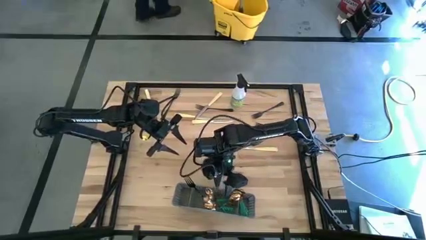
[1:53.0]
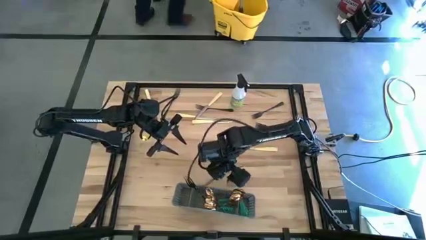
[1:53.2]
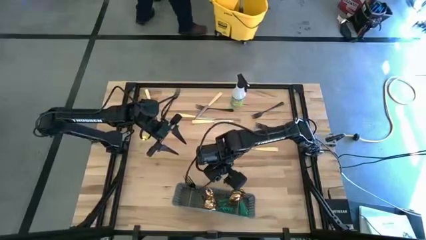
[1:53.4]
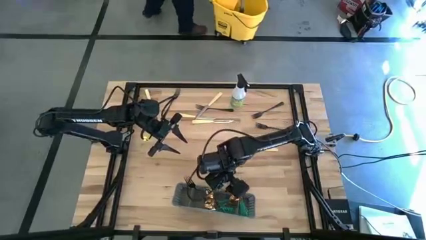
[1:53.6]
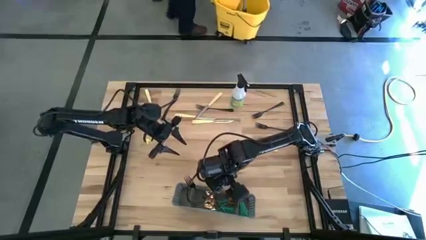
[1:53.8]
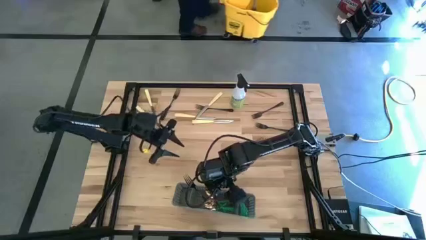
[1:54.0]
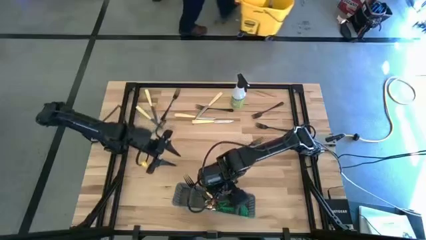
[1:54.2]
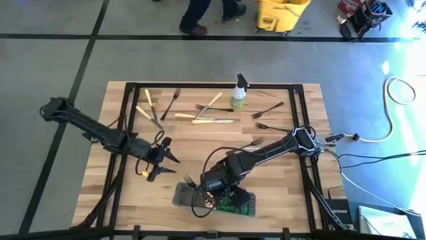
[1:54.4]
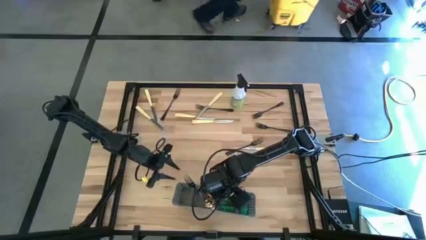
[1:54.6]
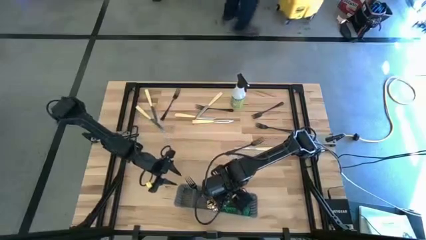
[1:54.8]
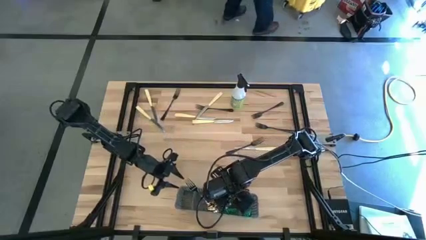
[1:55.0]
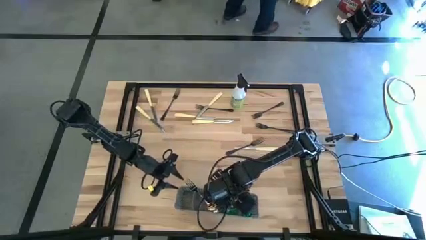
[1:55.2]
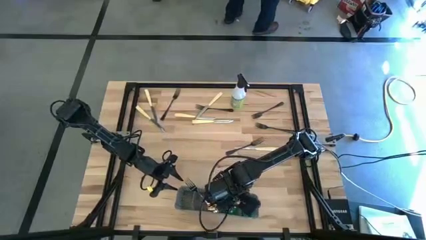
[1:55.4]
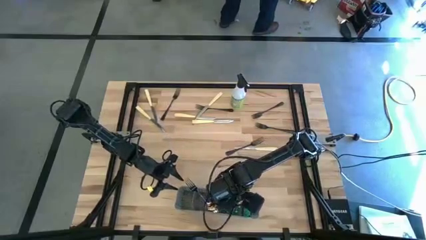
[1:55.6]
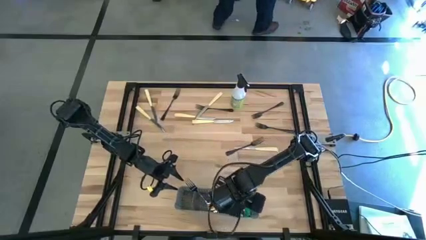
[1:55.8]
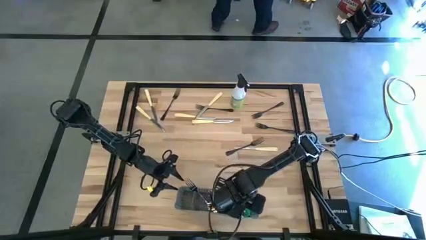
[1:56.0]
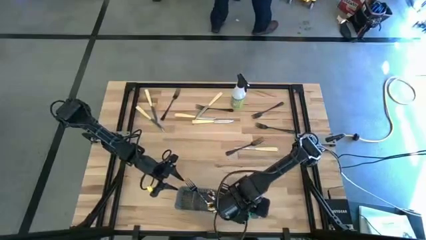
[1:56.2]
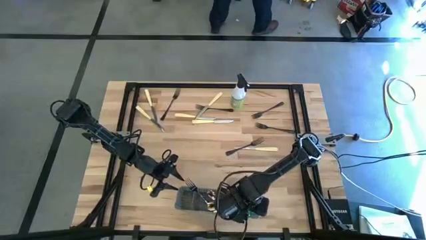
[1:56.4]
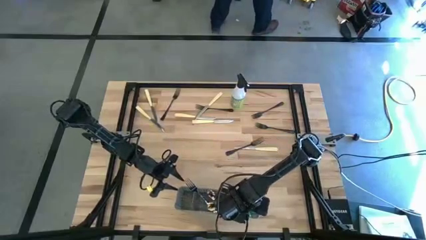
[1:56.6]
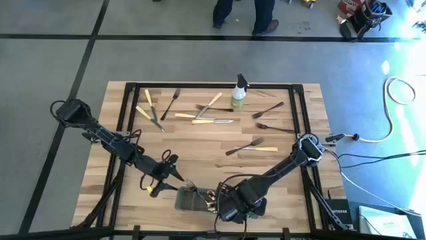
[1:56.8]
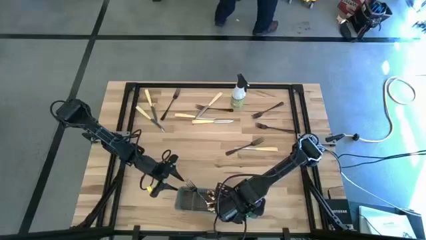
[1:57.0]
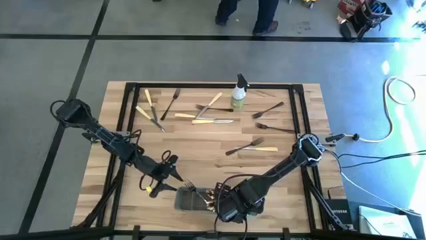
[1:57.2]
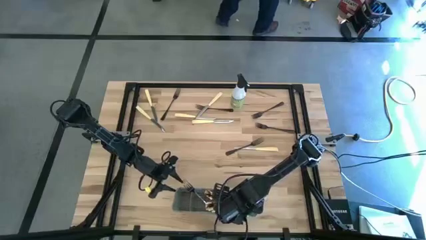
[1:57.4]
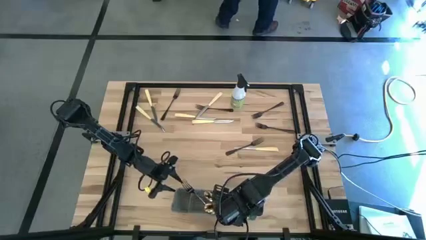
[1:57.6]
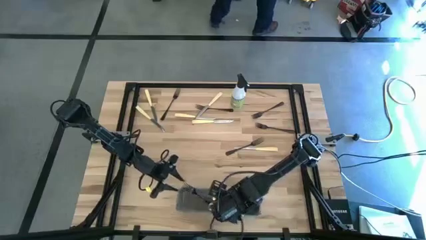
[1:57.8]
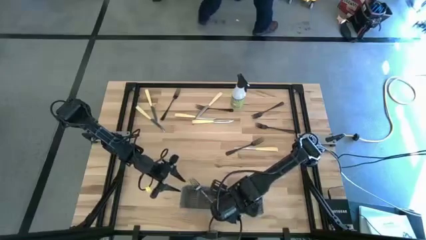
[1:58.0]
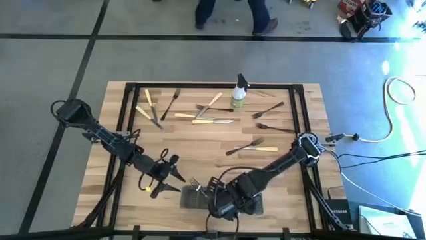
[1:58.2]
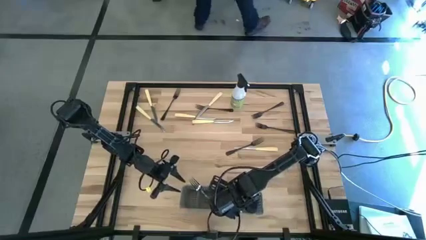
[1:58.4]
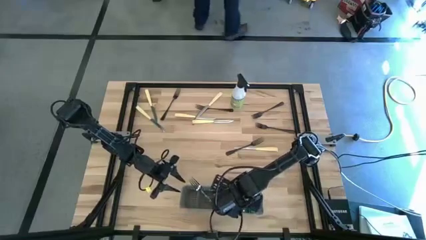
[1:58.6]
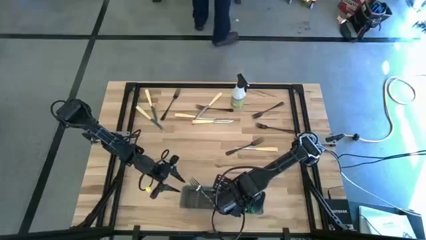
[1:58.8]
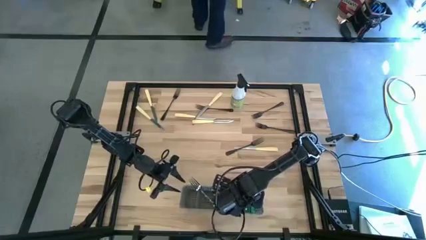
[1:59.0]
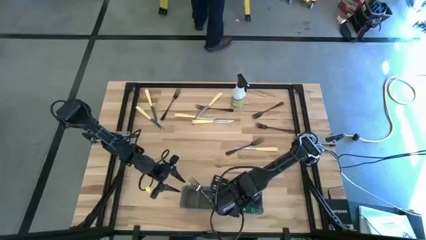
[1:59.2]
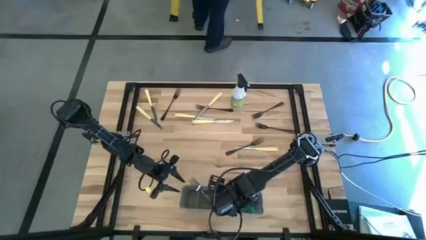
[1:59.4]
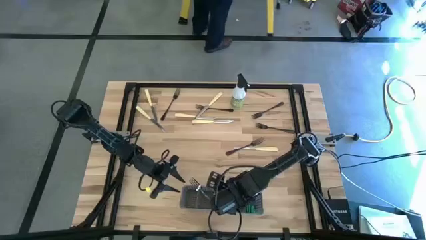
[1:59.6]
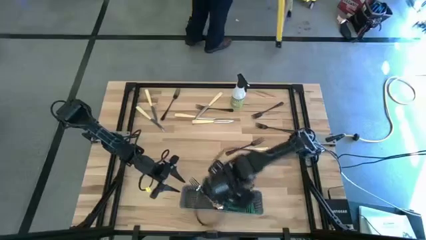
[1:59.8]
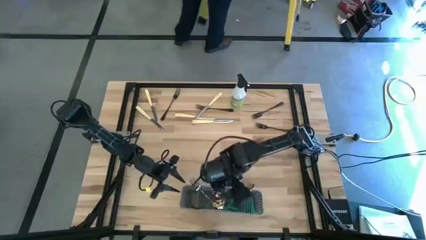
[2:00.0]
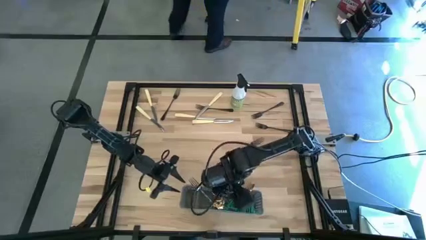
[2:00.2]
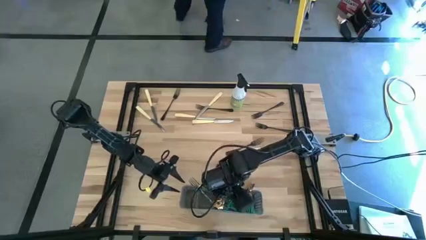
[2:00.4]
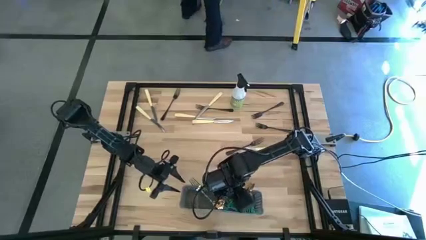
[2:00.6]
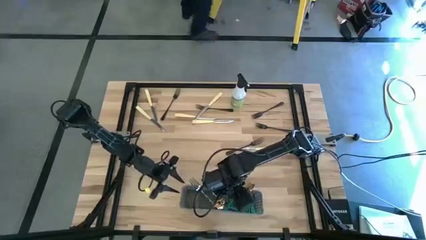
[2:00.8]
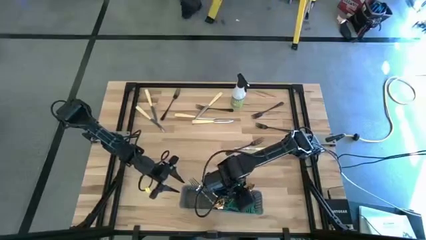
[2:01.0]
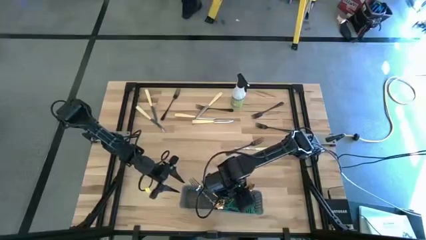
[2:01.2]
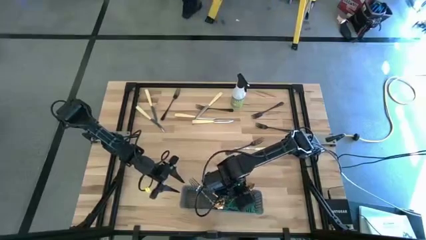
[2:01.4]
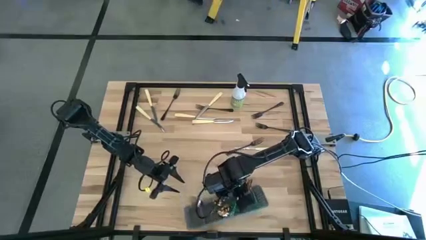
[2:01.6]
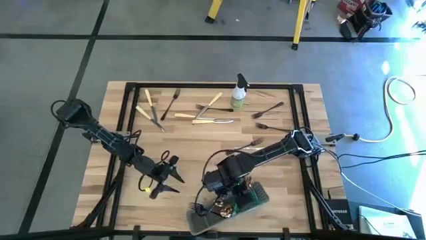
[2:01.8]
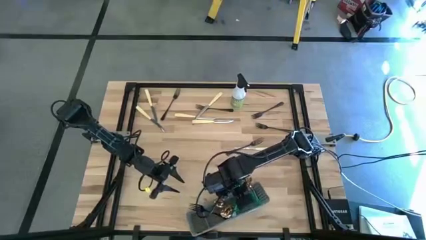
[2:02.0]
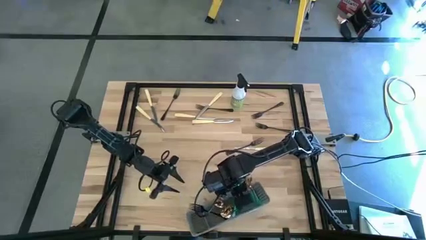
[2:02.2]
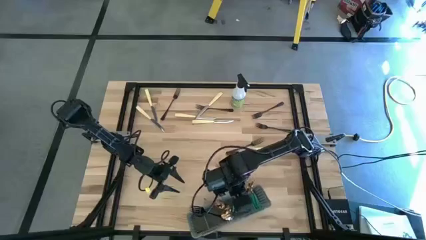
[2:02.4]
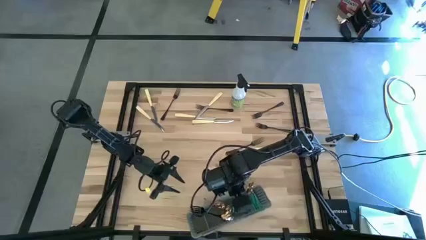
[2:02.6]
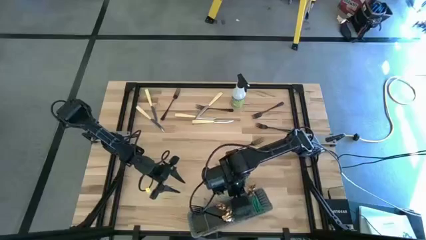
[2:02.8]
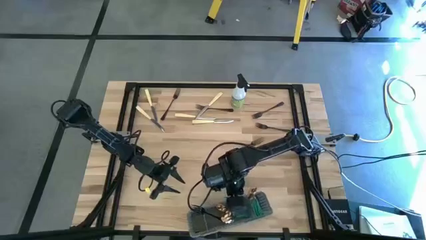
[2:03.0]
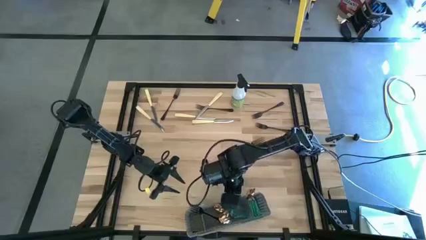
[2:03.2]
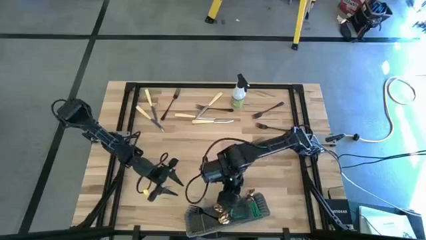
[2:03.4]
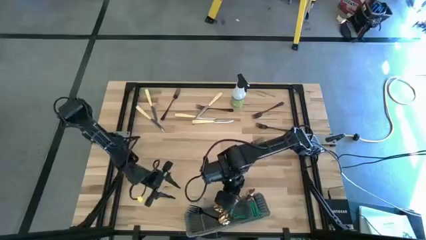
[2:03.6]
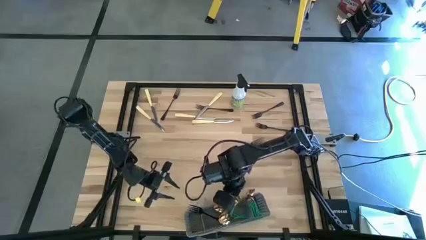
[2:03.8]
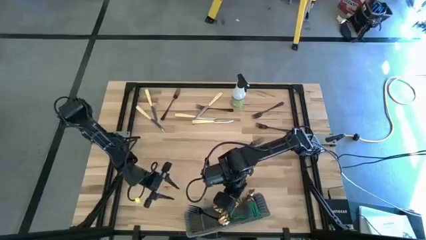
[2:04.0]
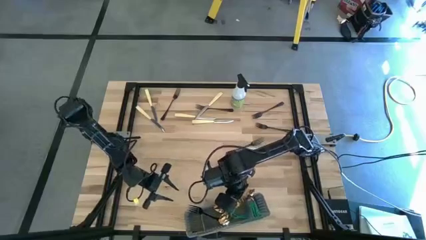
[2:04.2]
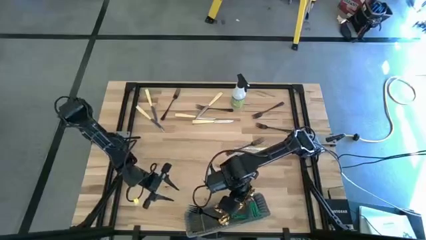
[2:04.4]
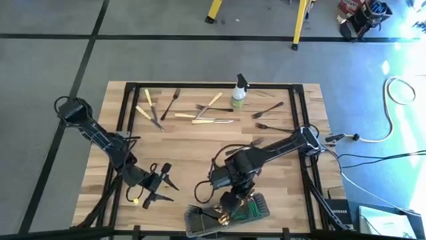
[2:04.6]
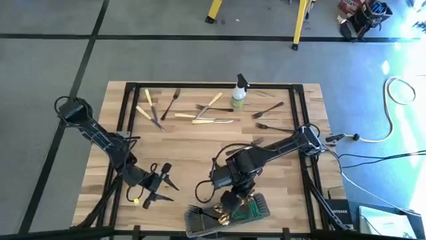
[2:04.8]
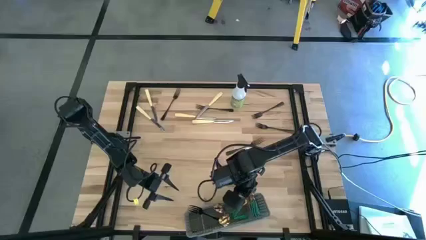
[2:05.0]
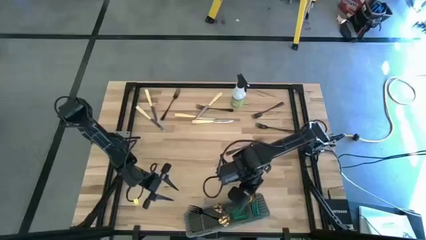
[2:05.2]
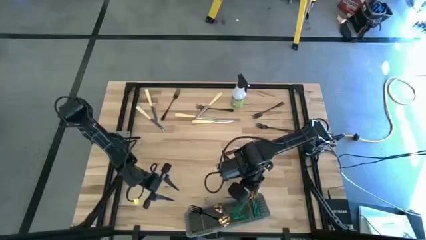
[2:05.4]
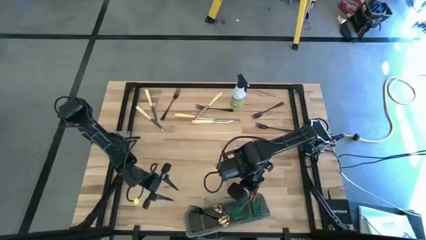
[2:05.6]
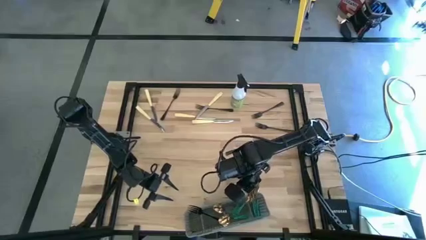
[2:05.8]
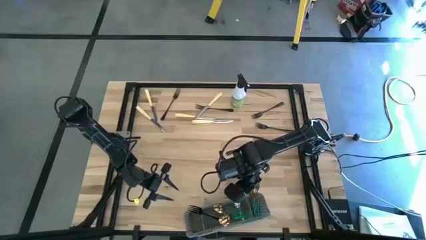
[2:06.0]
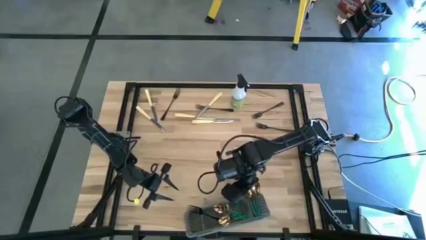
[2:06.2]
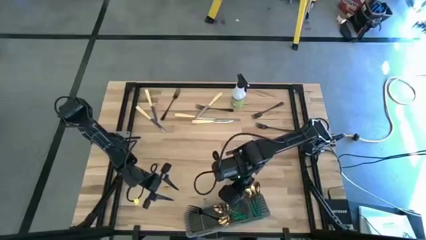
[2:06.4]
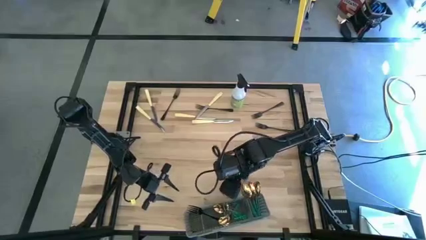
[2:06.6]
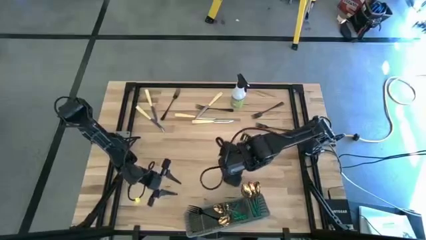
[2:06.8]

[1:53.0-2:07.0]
Task: Sort silverware
Adjust the green spoon to its right position

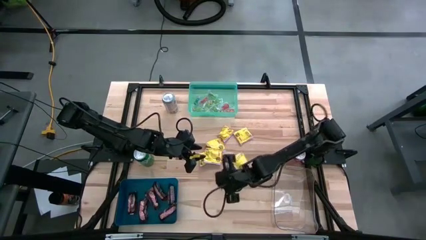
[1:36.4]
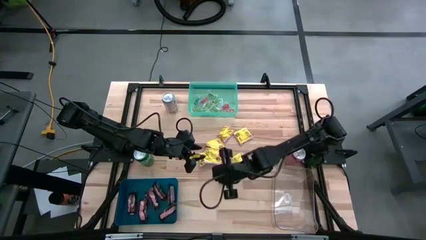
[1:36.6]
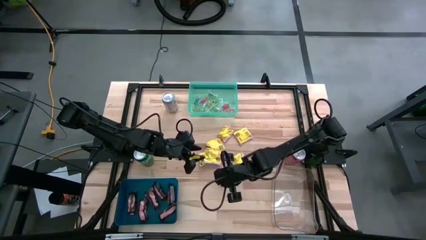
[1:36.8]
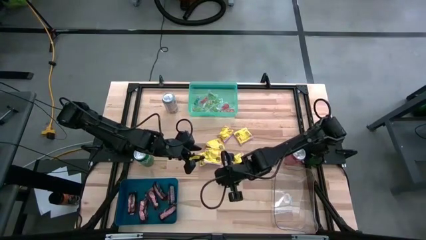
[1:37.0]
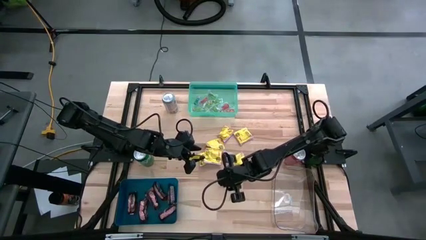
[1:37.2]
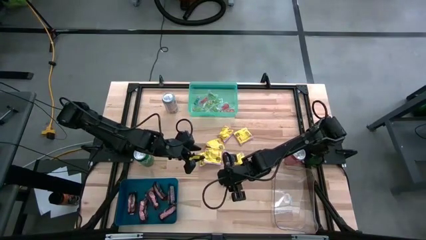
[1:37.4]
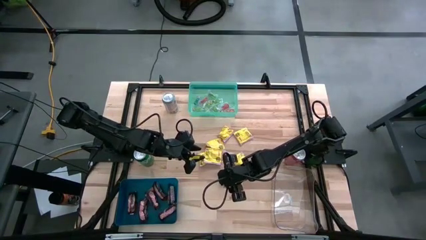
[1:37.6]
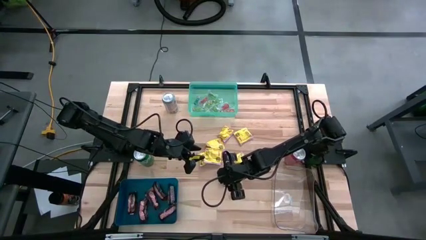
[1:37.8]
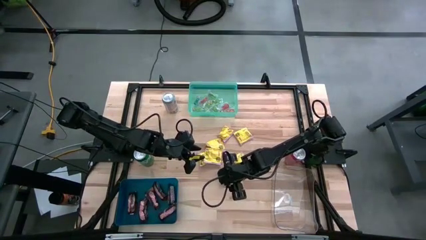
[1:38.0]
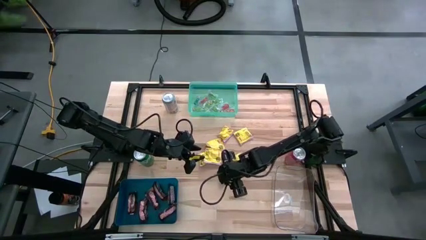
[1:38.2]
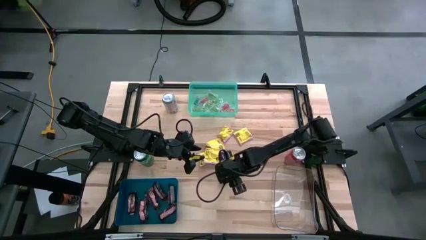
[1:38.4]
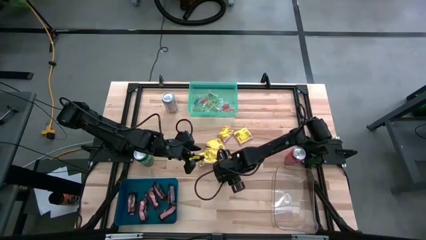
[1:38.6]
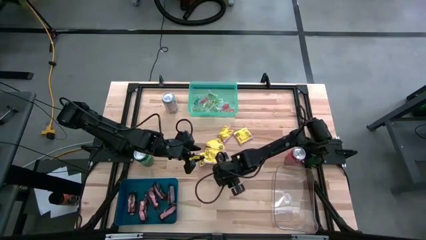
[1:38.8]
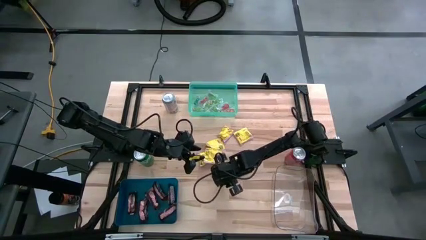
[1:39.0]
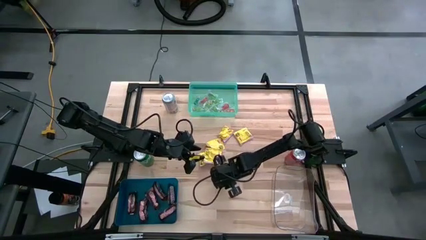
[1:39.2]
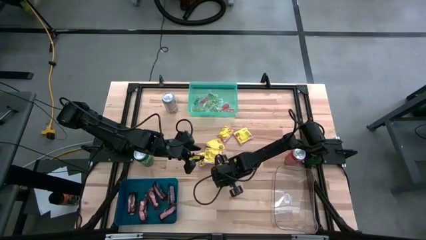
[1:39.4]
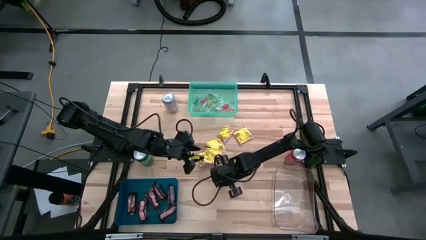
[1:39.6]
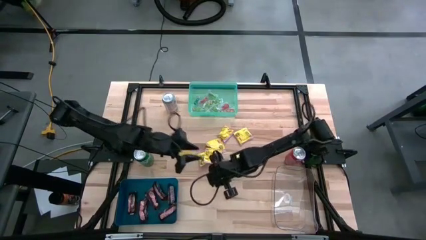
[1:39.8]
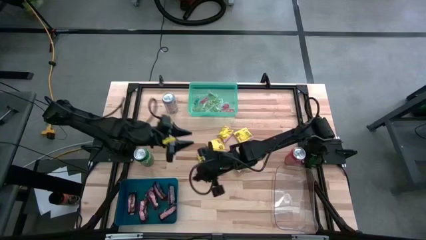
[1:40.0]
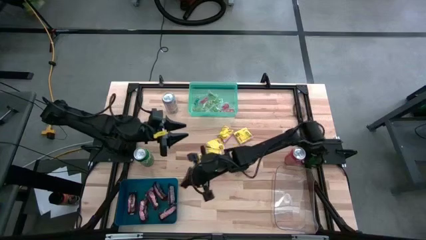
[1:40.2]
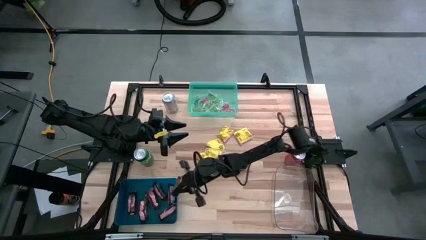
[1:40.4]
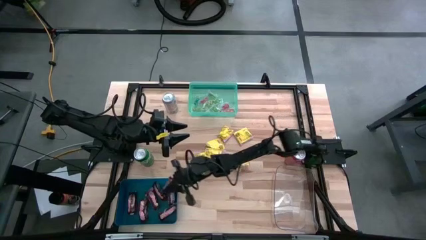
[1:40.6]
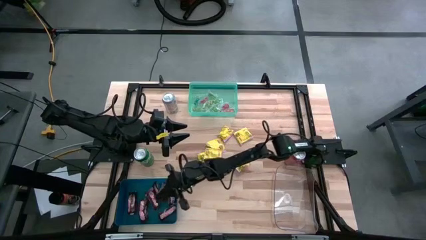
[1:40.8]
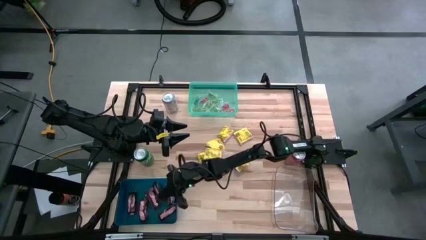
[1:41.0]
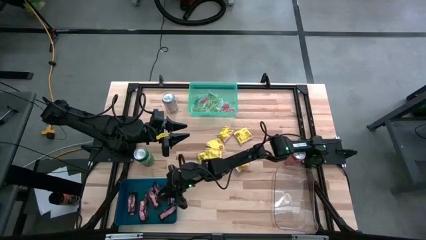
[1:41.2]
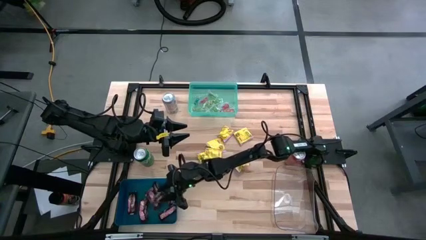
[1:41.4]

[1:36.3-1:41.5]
Task: Sort candy
Put the brown chocolate into the dark blue bin
